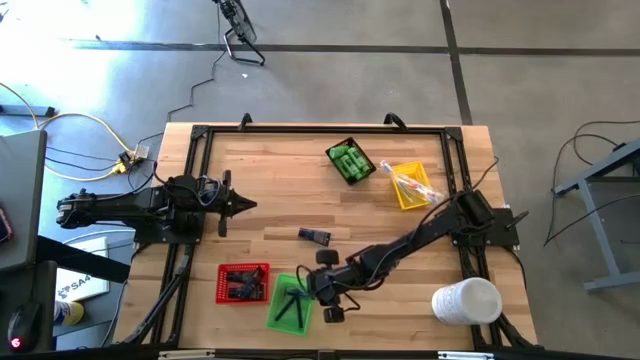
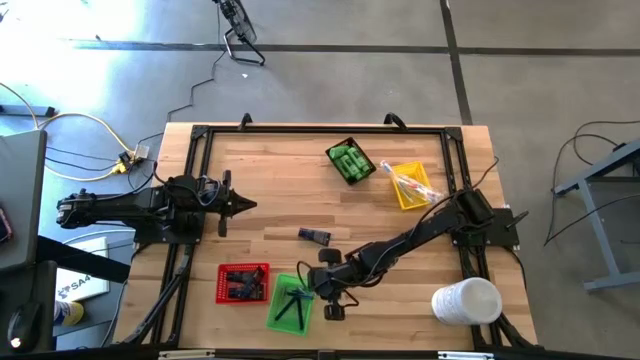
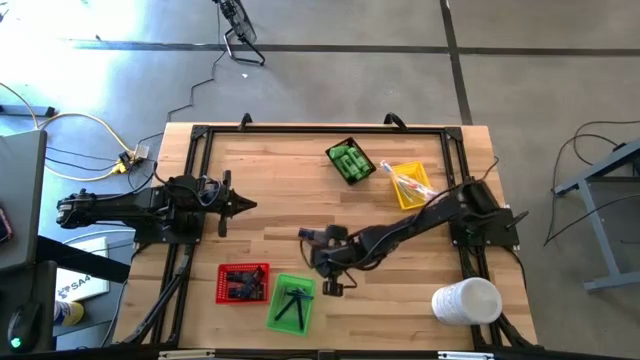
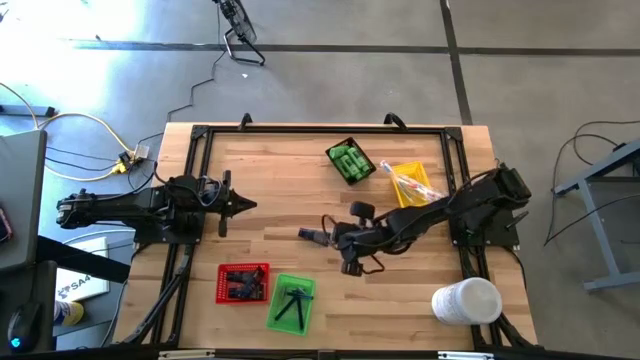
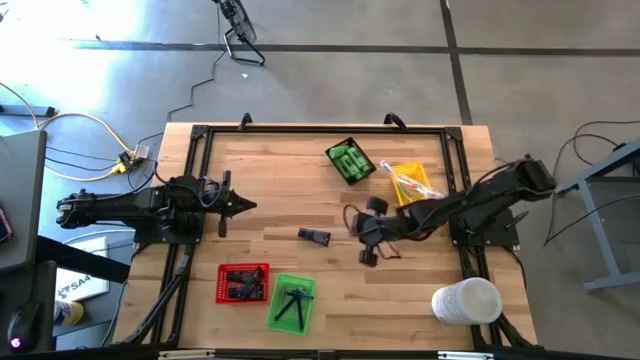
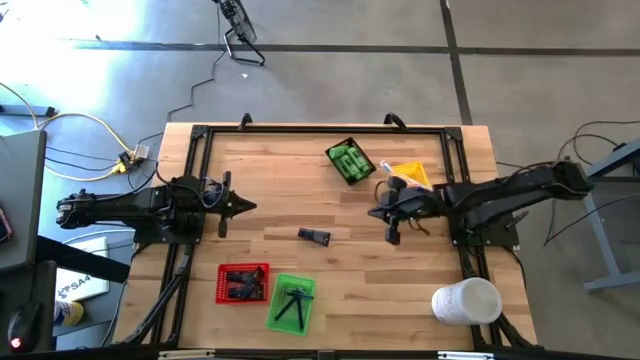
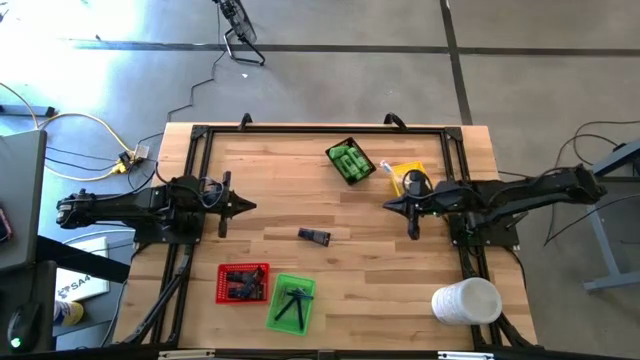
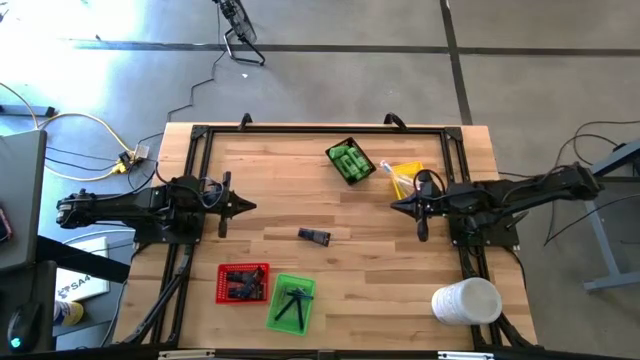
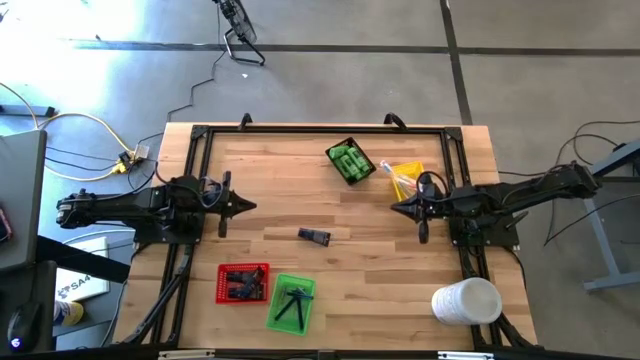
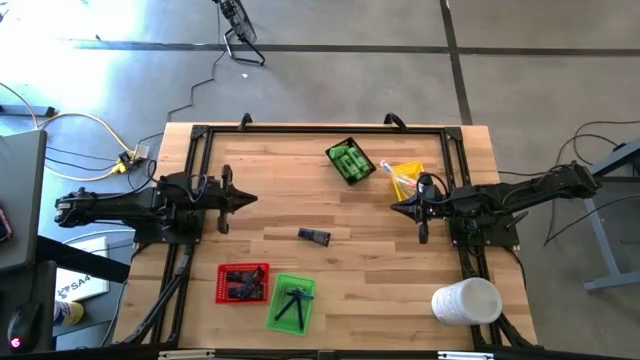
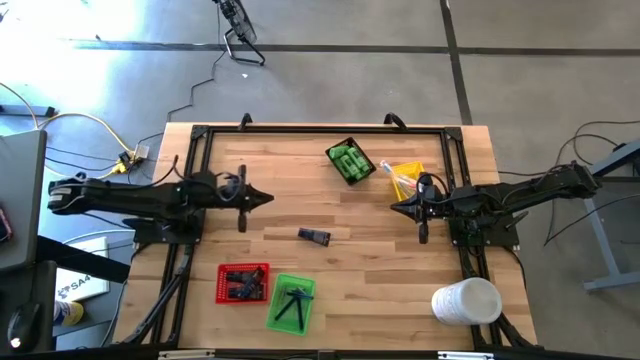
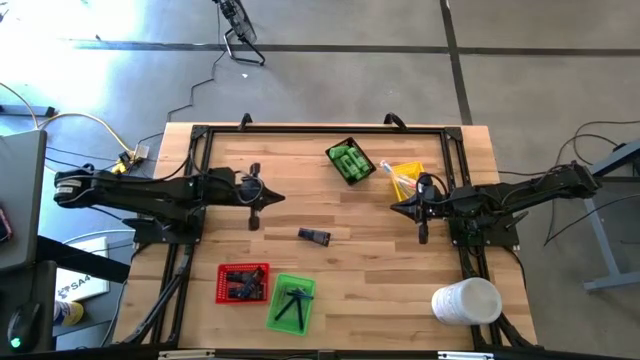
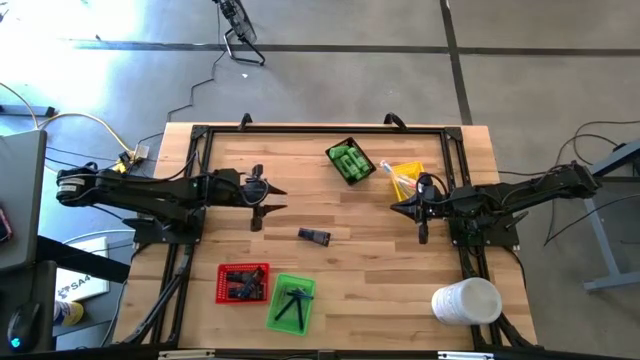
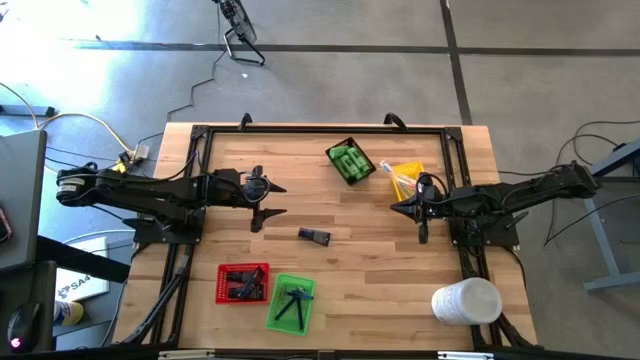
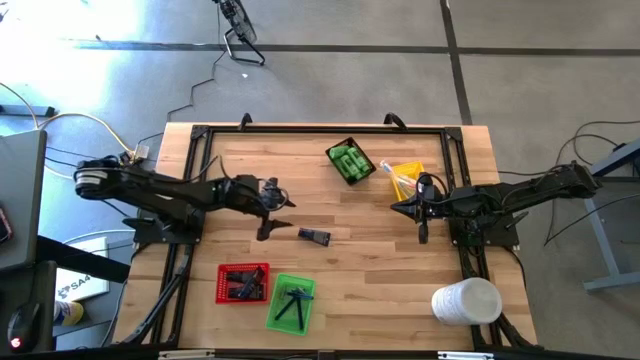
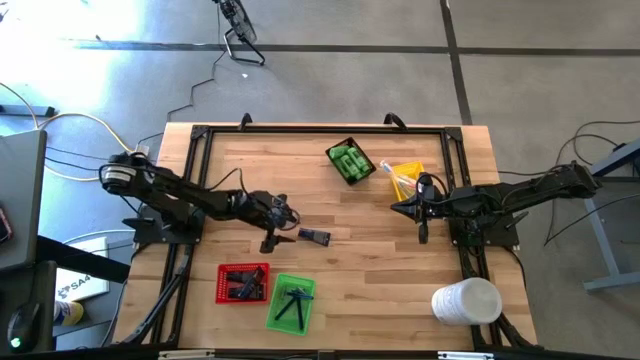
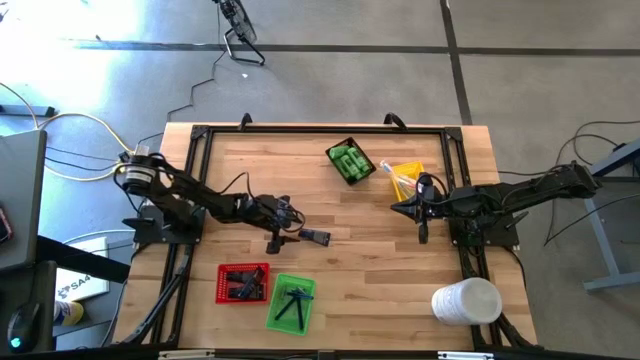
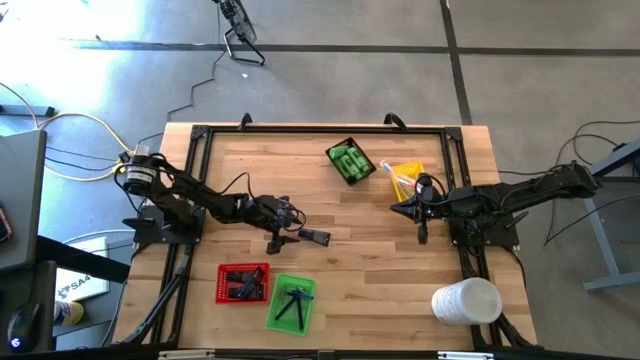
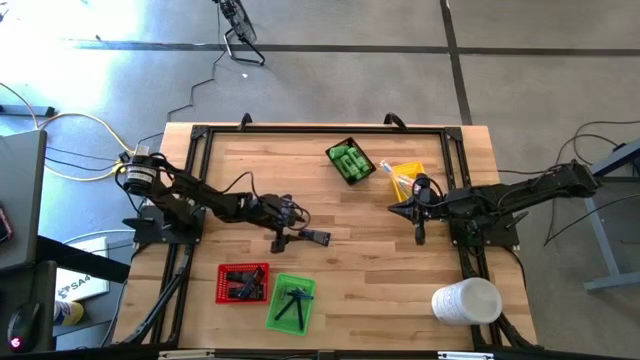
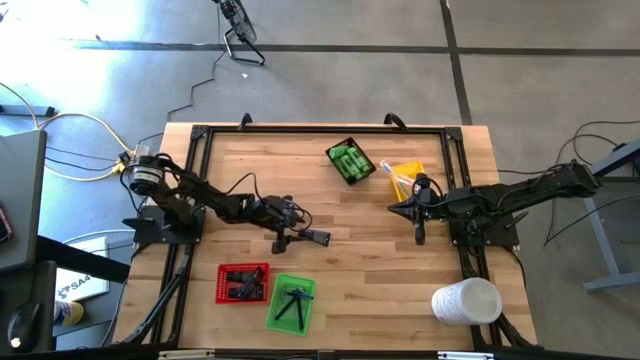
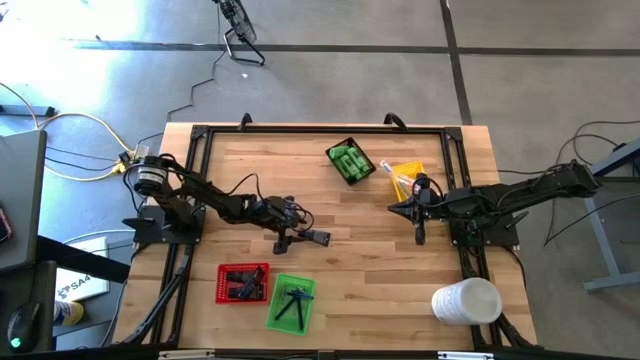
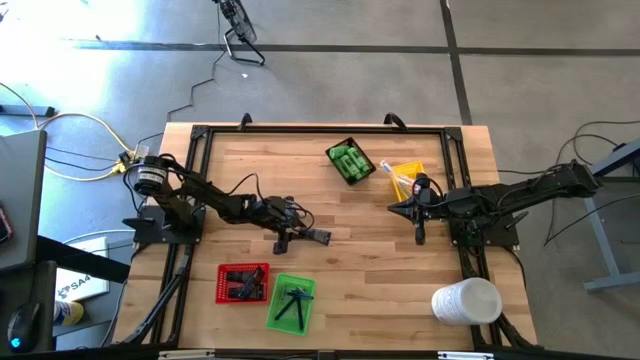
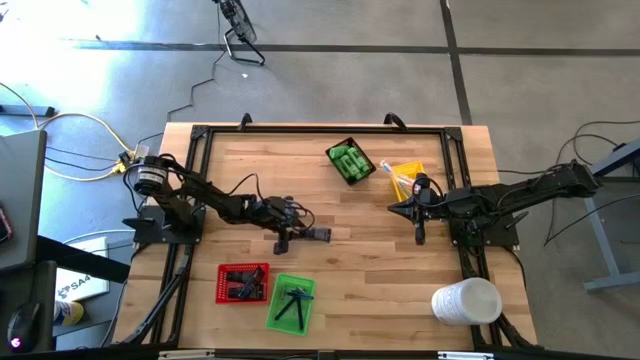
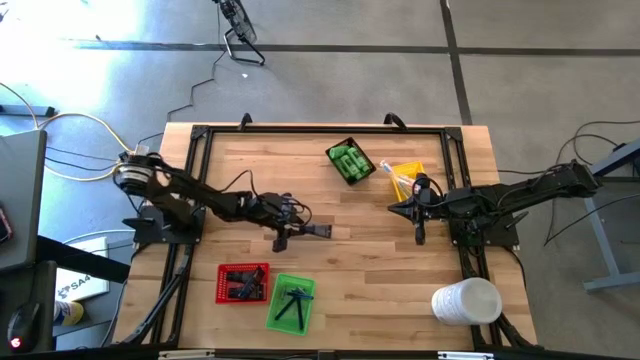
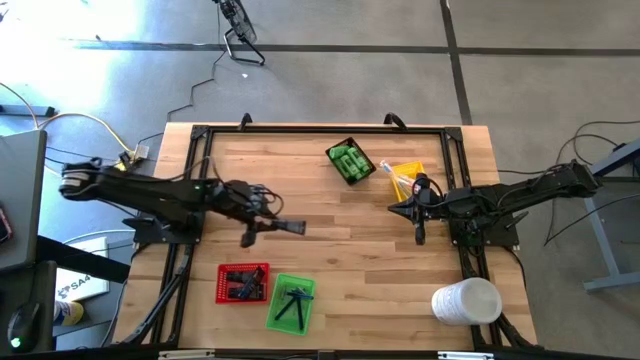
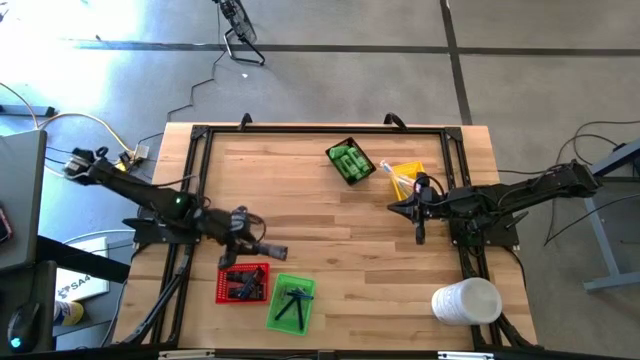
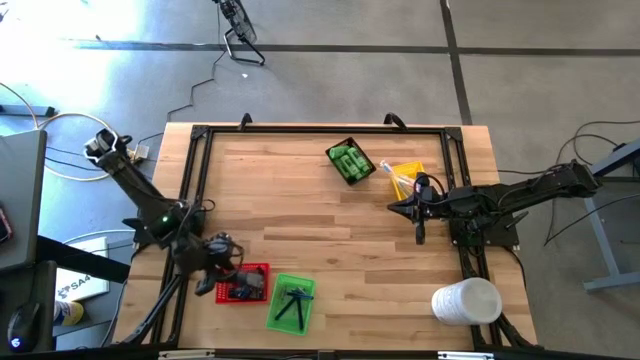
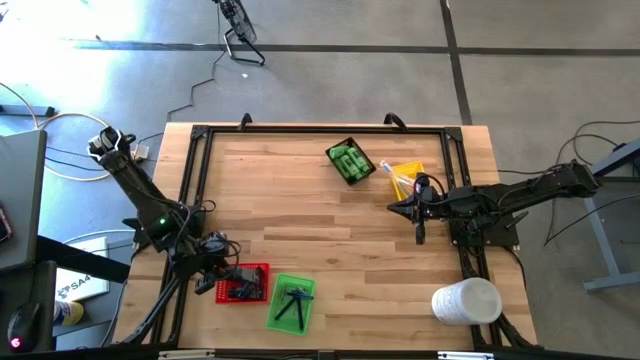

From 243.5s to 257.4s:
Task: Pick & Place Travel size toiletries
Put the shave cream into the red bin

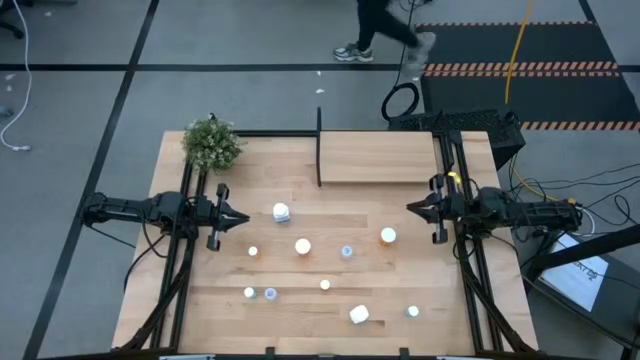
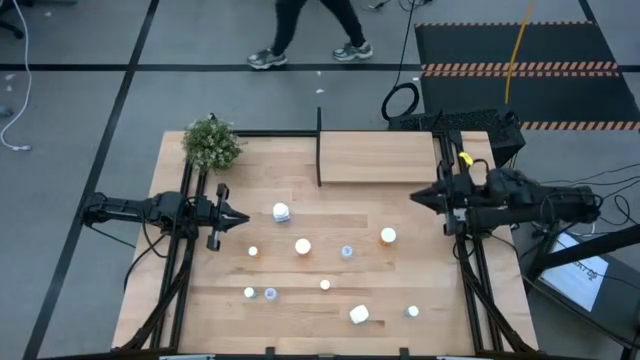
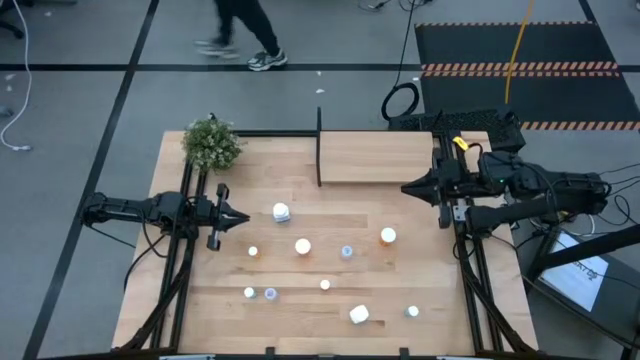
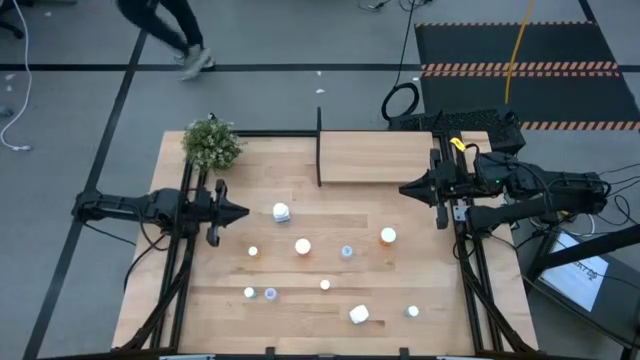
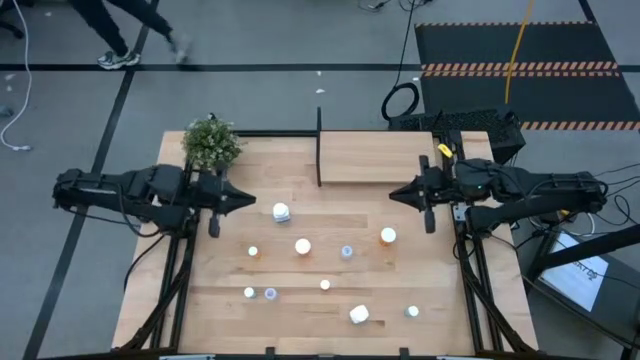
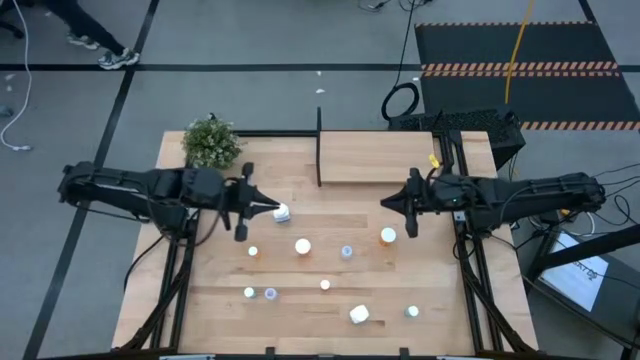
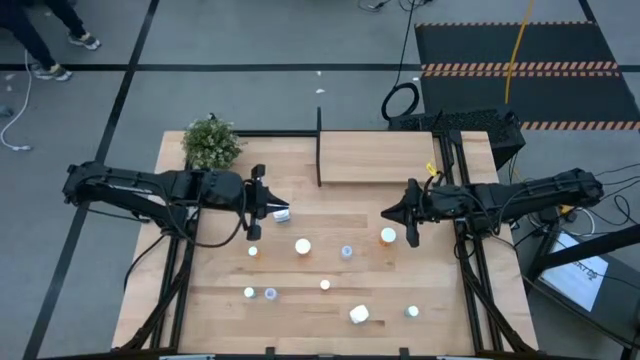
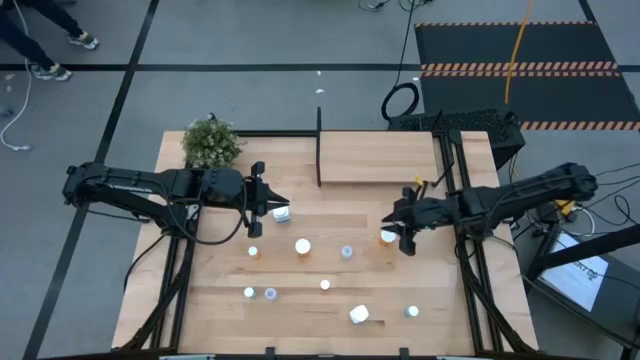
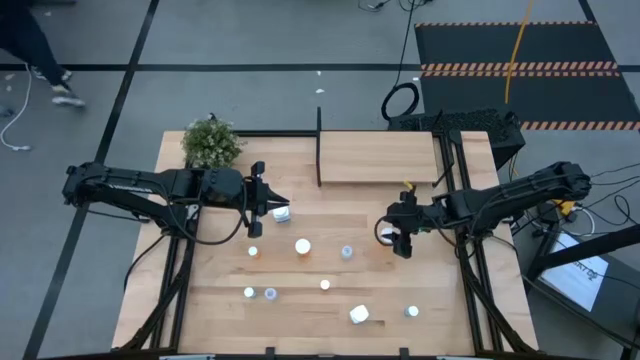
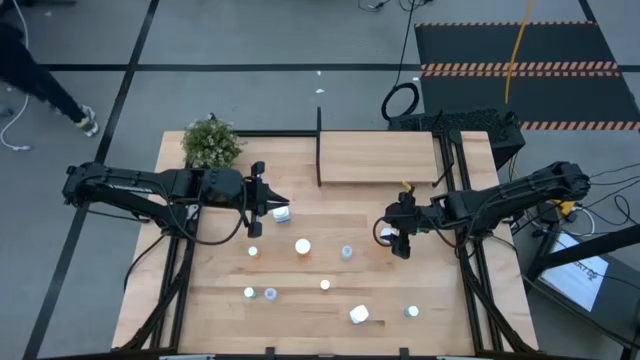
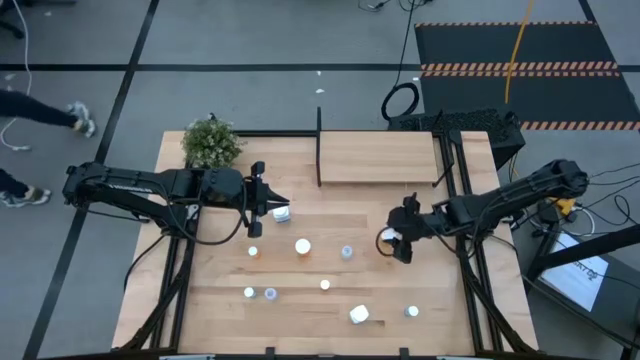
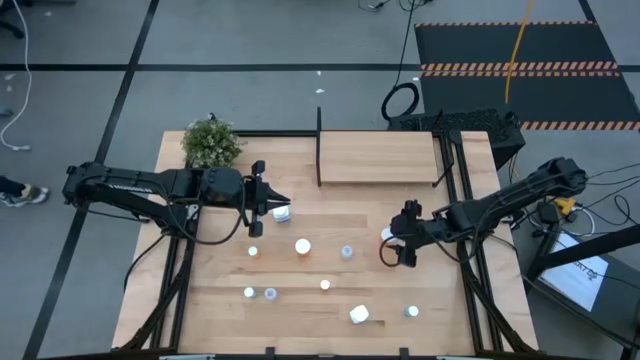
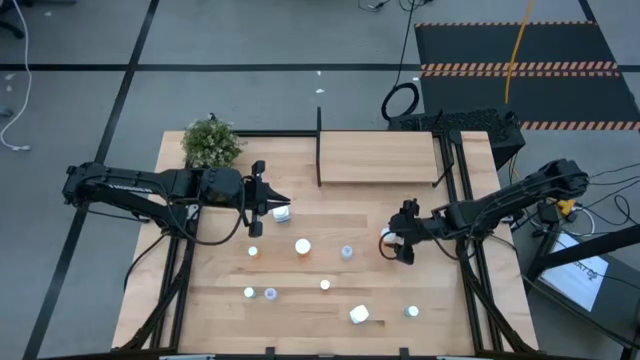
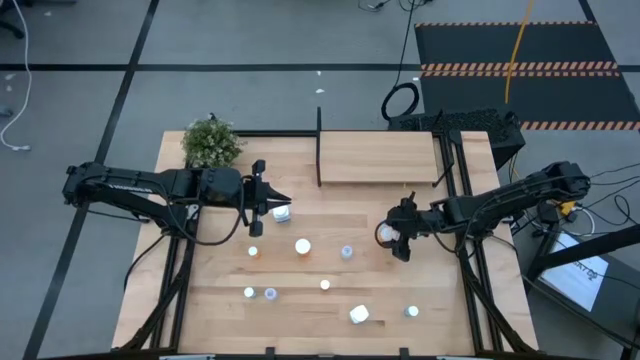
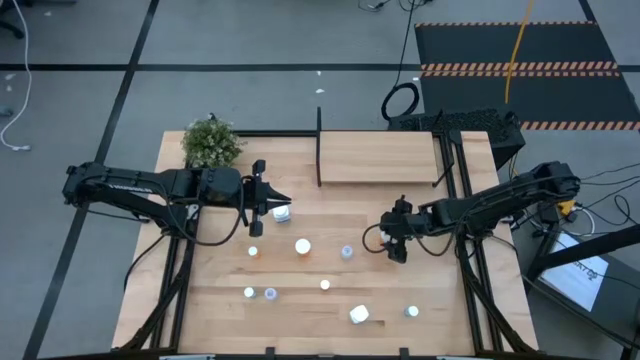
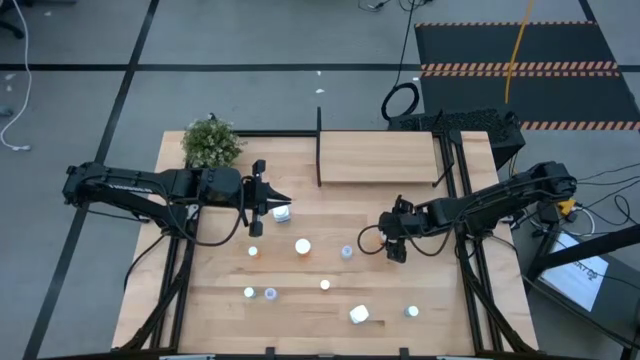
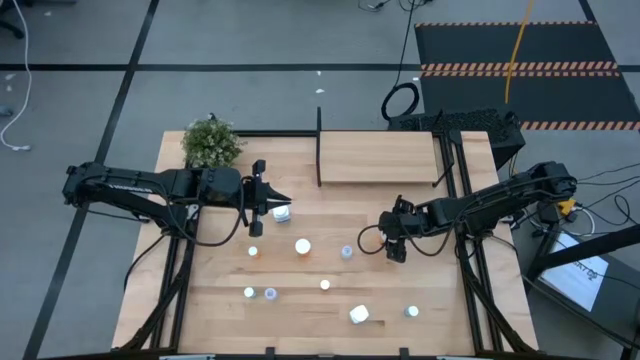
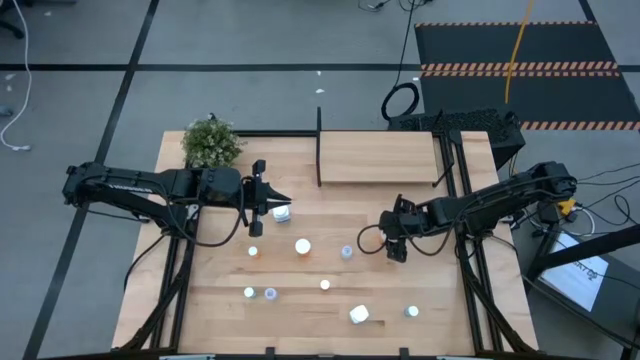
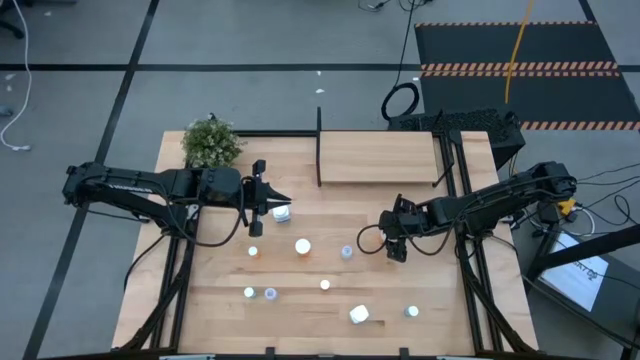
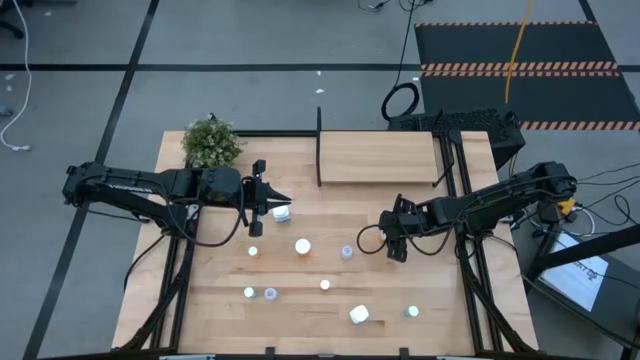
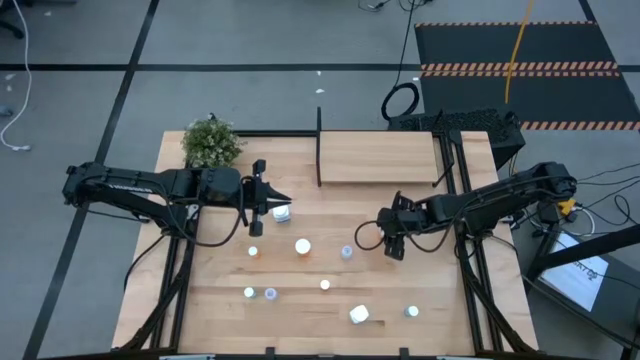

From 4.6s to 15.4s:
Task: Pick and place medicine bottles onto shelf by color
Put the right large orange pill bottle on the shelf
